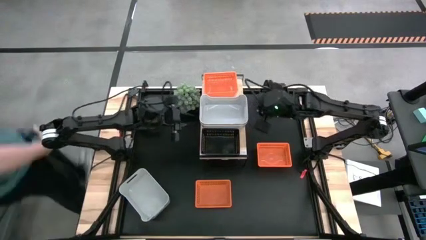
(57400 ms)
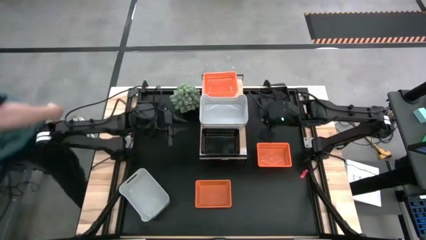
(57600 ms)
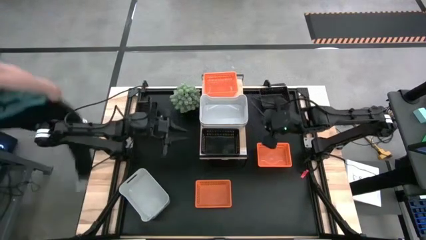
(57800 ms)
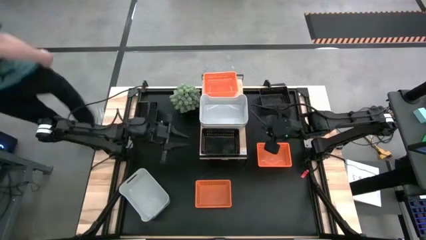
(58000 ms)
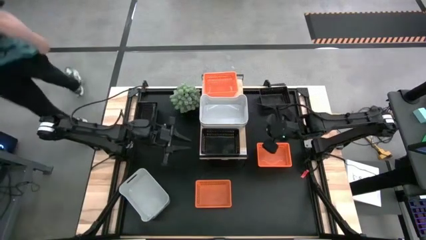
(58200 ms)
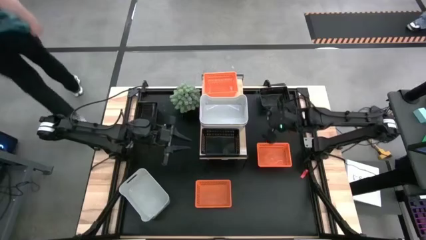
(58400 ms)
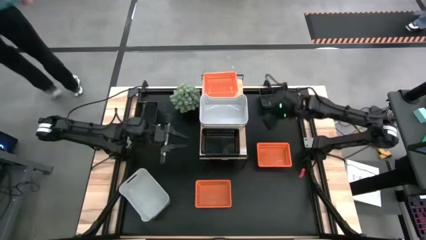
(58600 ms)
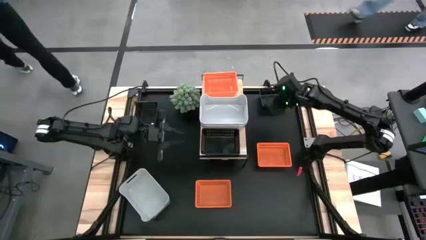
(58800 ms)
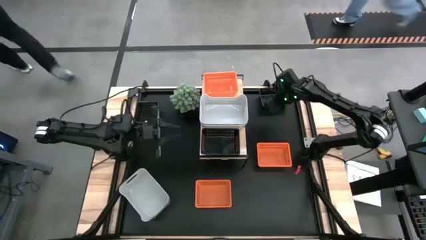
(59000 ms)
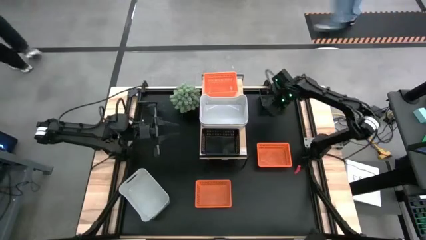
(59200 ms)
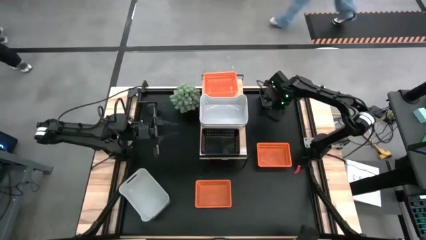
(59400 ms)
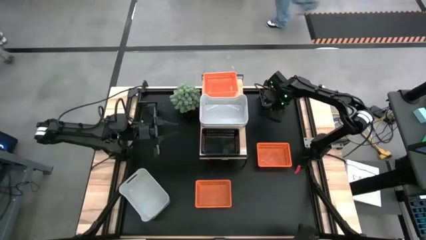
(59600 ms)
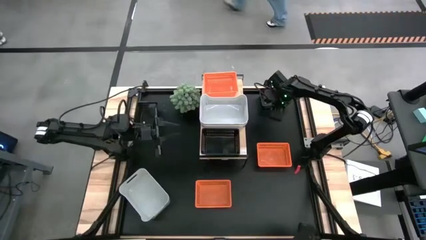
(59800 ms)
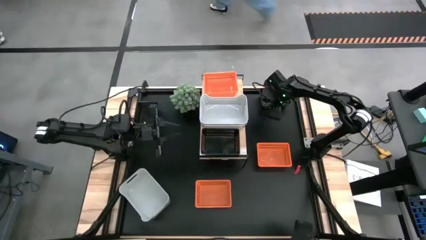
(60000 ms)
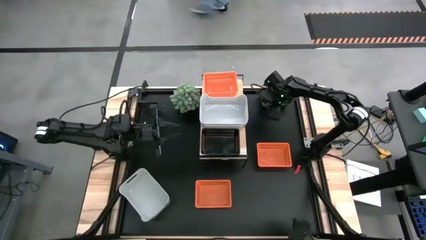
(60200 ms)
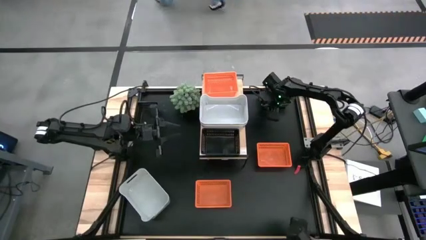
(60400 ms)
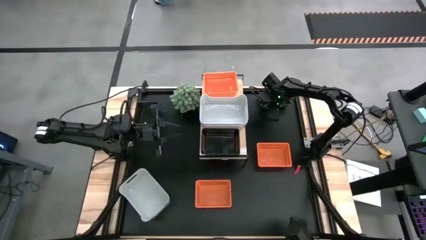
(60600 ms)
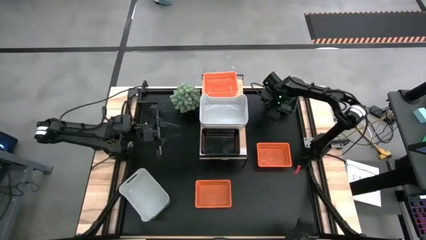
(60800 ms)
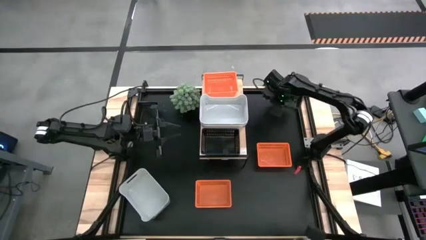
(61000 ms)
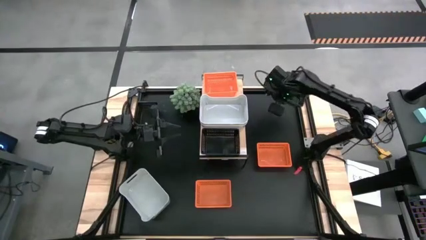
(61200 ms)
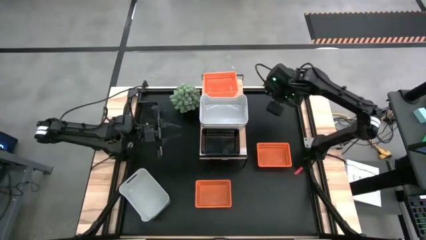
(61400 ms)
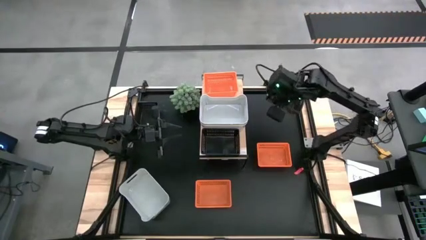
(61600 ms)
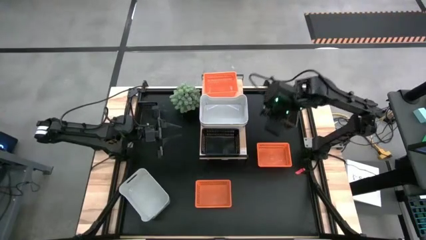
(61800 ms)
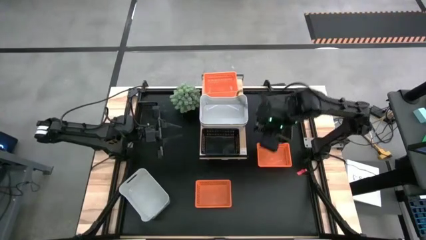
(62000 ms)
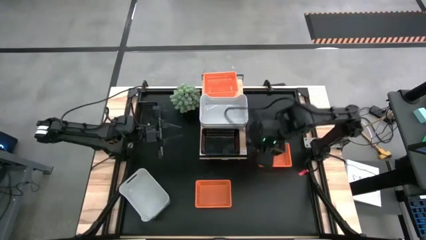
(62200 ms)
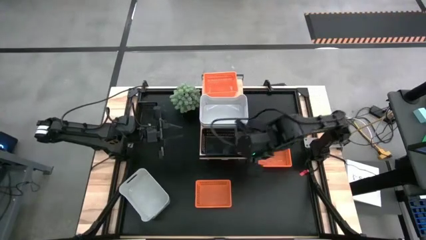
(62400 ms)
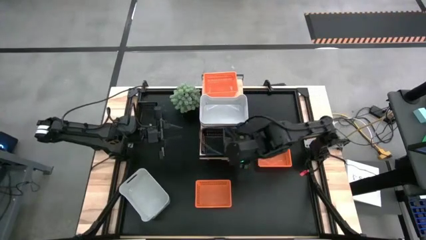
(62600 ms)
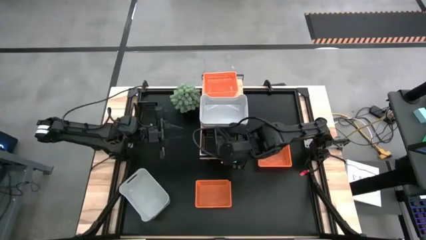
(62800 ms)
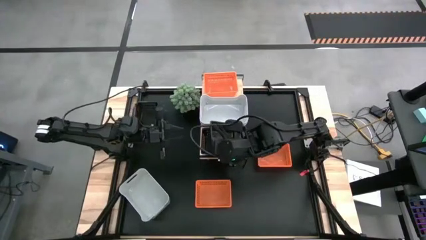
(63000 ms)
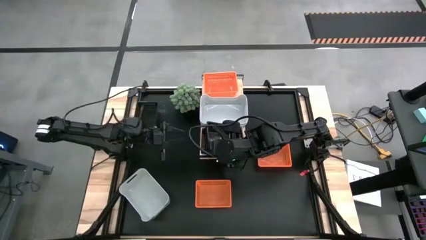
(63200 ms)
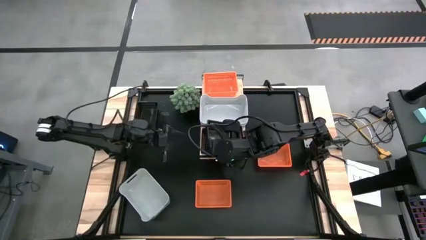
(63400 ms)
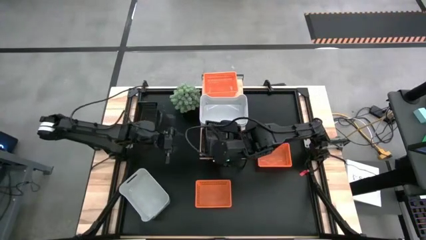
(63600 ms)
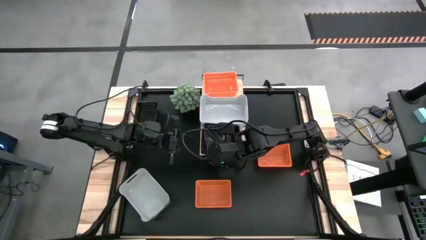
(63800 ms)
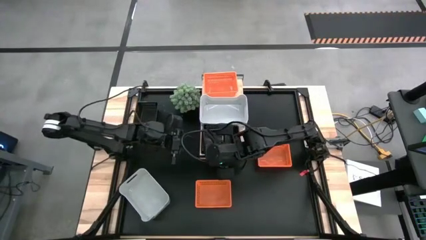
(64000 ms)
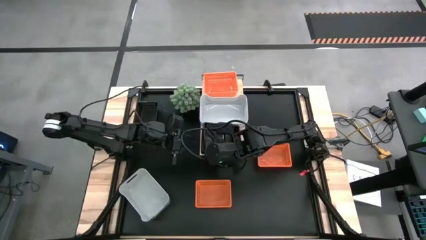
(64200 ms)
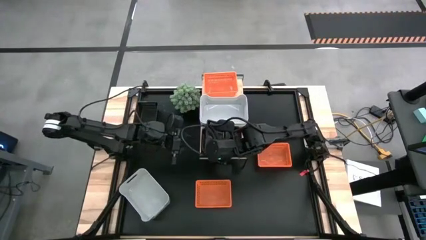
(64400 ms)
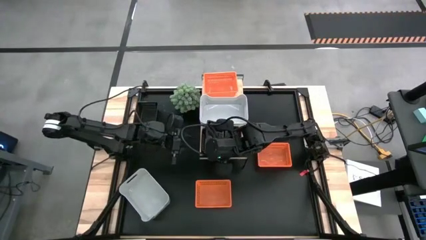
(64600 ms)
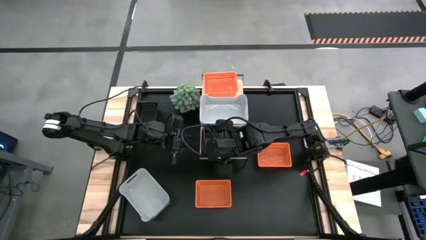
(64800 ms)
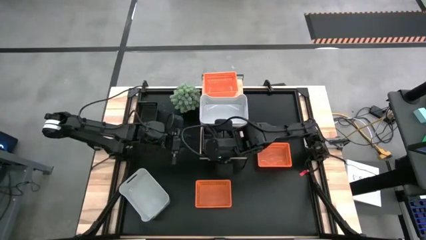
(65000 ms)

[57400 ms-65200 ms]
Task: Stack baskets on shelf by color
Stack the right black bin into the black bin on the shelf

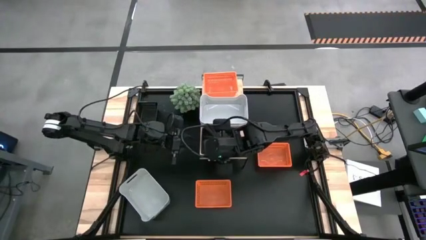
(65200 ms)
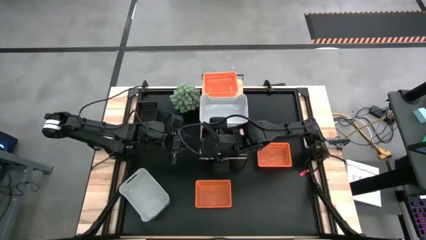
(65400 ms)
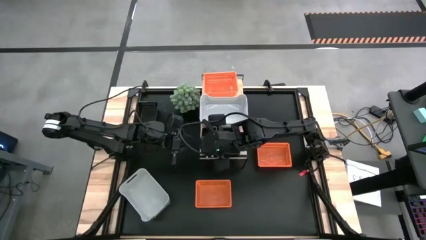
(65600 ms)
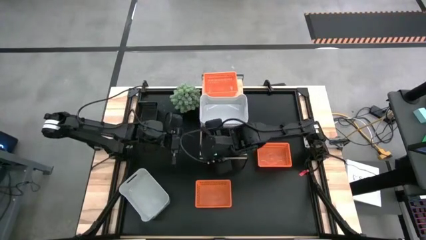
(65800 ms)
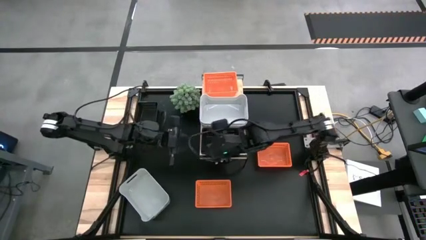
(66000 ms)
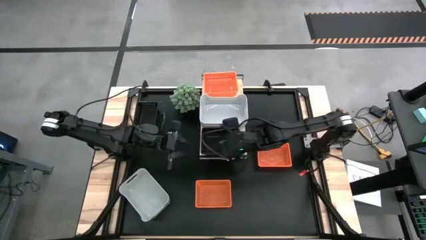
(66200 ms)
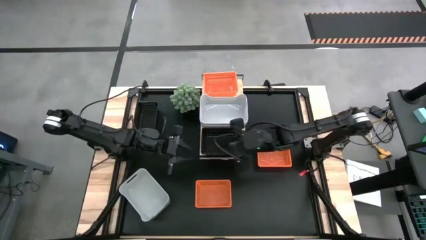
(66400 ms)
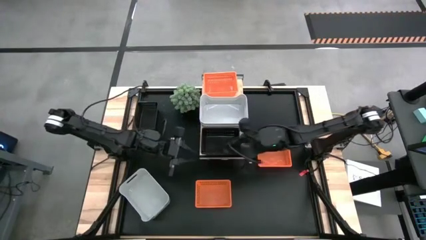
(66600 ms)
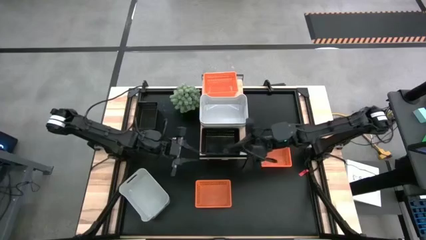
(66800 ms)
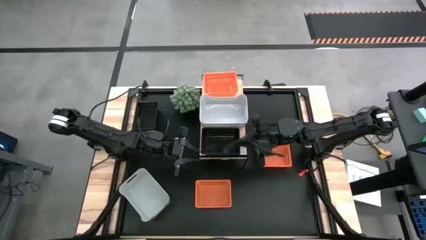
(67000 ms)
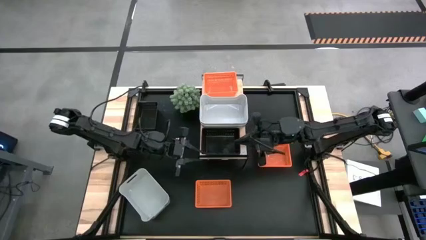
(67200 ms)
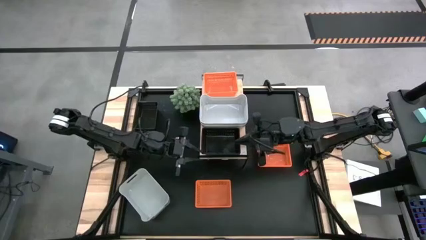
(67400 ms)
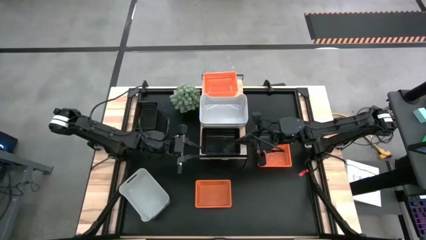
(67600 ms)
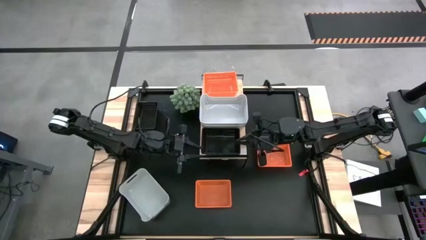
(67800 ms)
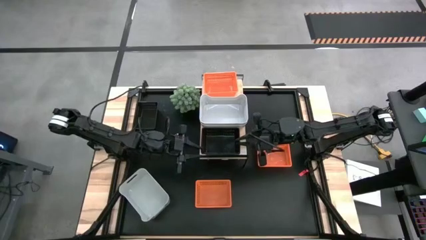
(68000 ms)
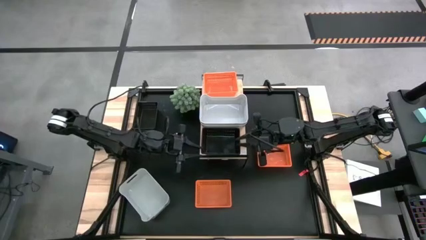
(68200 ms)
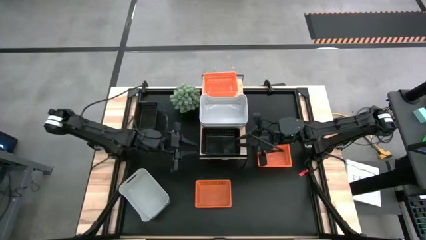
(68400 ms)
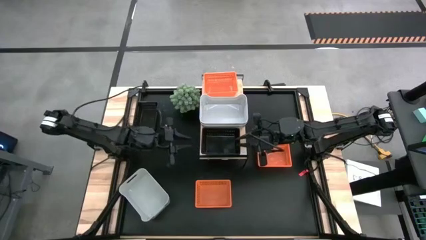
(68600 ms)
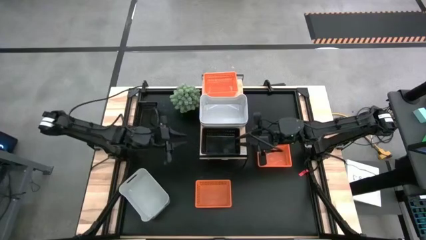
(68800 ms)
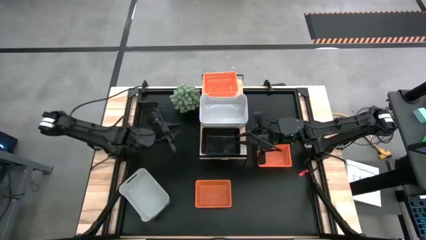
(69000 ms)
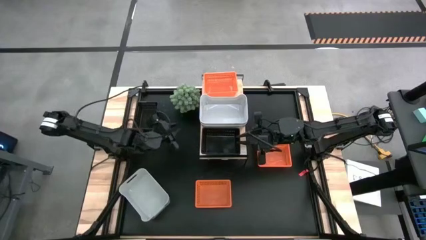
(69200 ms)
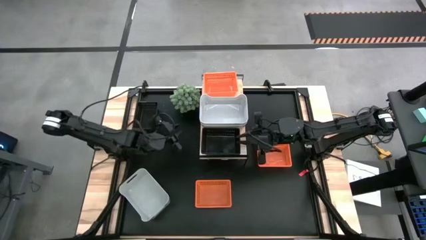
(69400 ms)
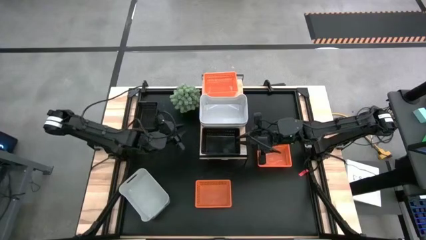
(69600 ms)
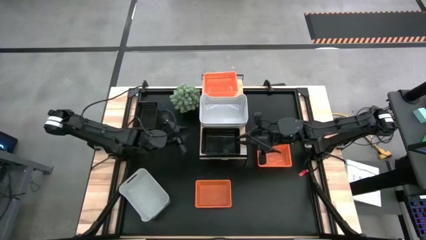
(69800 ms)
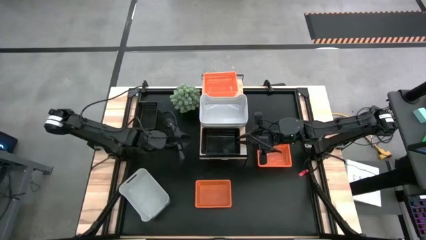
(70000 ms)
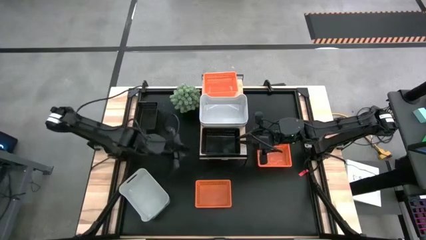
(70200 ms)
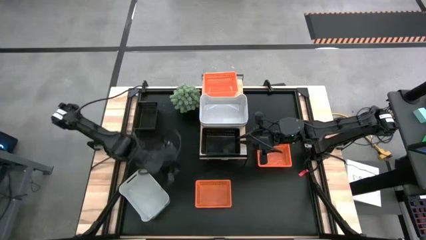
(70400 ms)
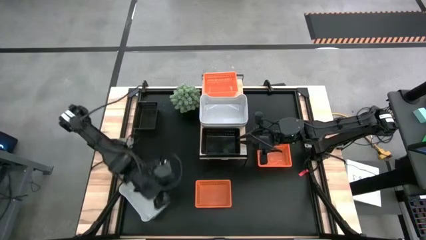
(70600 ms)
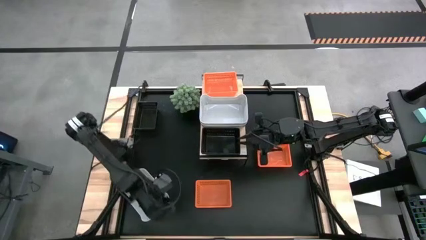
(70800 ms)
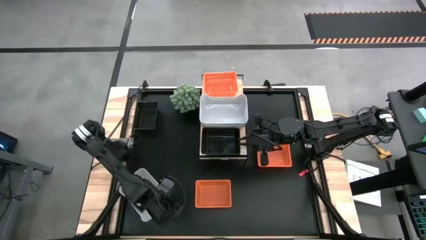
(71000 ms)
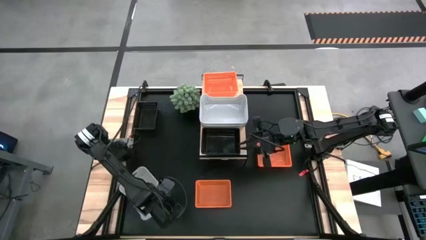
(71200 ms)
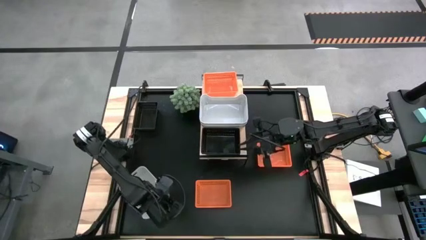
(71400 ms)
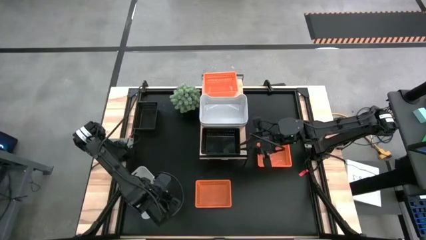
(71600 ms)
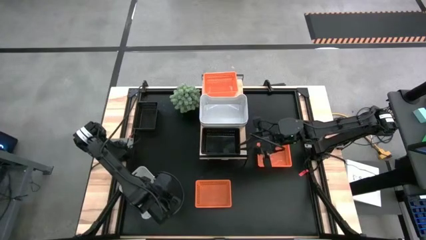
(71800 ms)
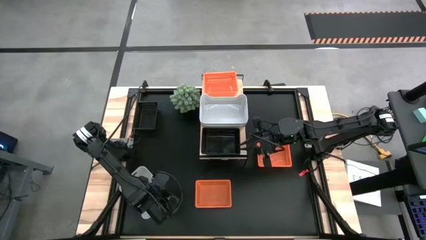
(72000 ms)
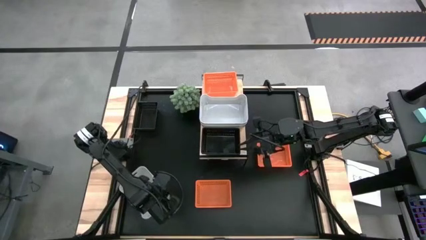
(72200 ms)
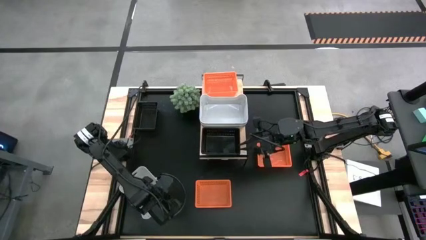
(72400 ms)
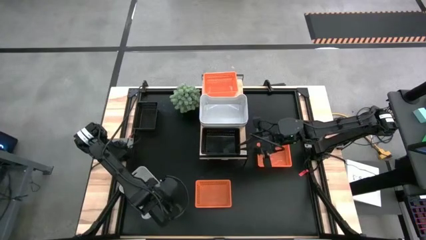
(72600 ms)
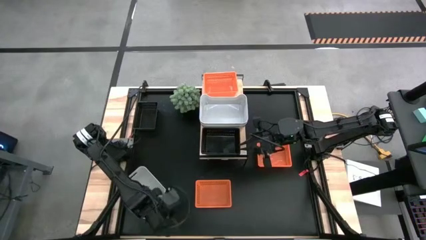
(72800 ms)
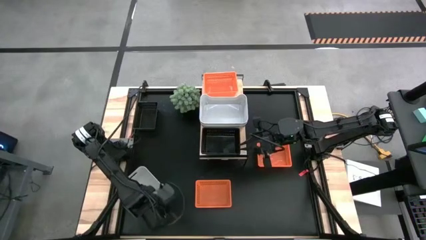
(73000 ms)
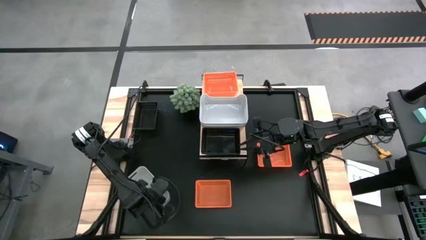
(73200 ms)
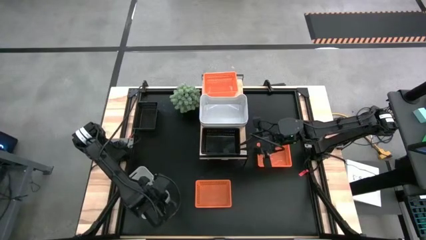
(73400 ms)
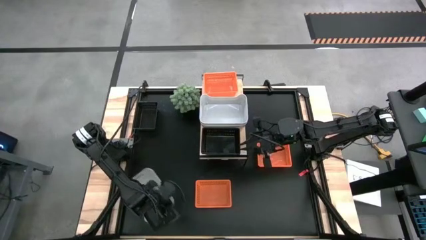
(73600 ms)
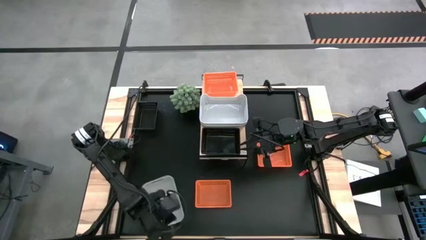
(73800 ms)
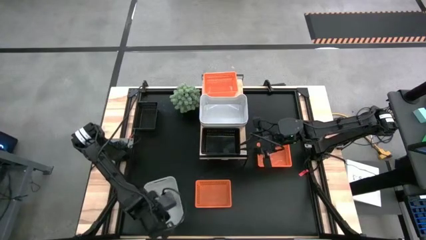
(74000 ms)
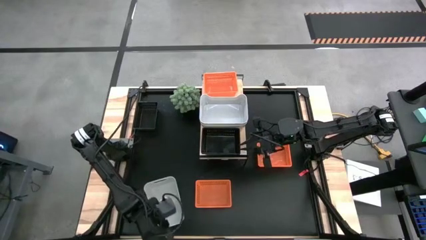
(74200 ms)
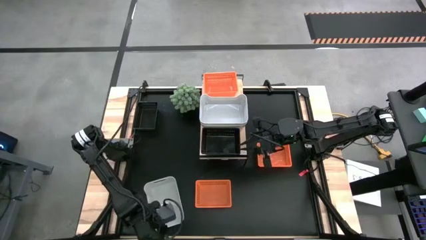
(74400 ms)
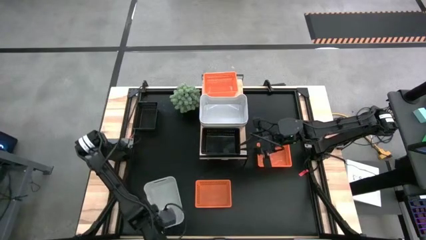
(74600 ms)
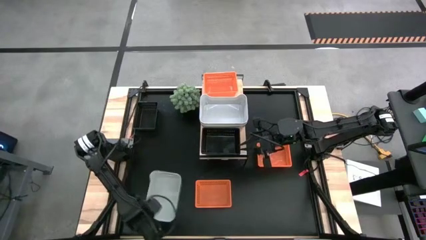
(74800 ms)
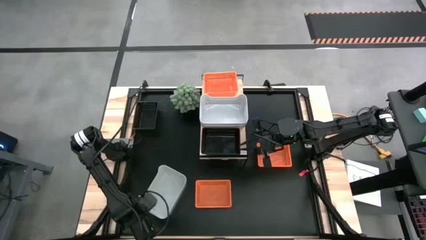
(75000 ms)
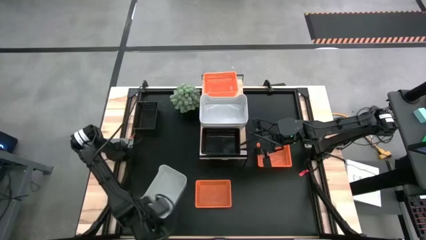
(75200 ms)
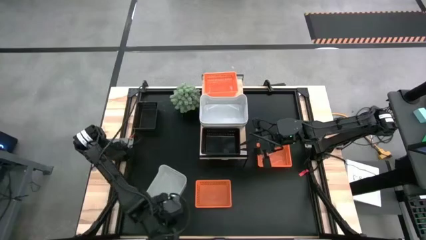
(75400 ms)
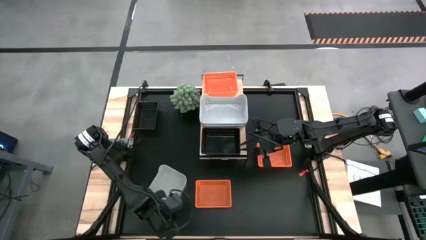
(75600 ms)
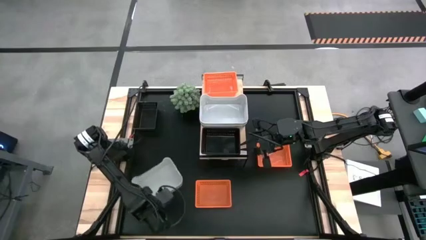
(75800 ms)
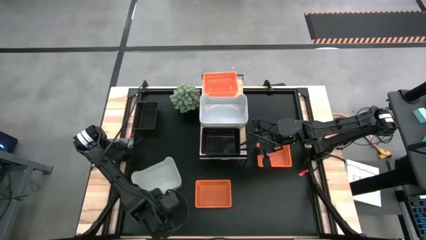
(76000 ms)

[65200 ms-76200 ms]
Stack the gray bin into the gray bins on the shelf
